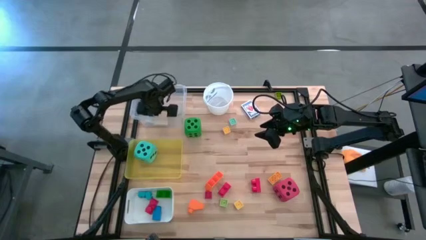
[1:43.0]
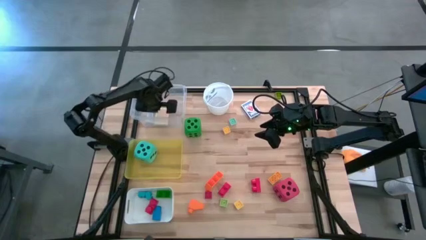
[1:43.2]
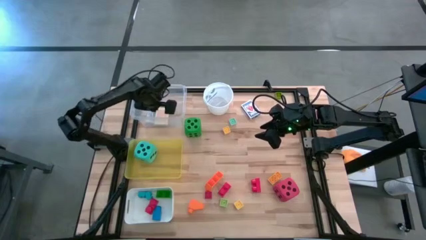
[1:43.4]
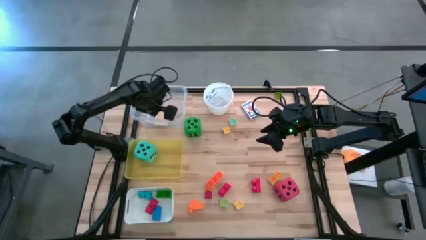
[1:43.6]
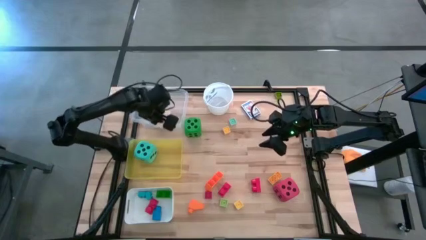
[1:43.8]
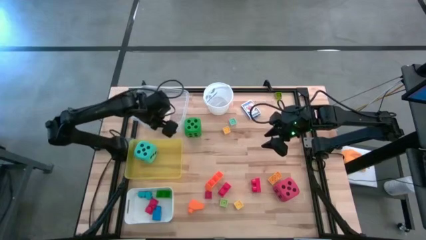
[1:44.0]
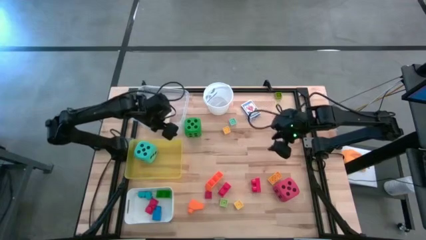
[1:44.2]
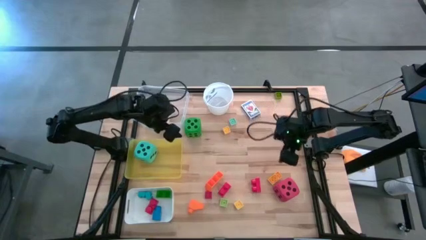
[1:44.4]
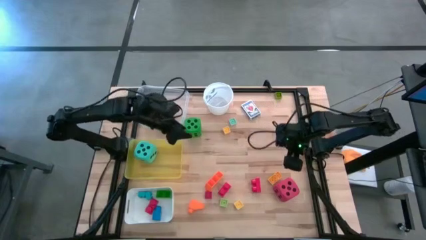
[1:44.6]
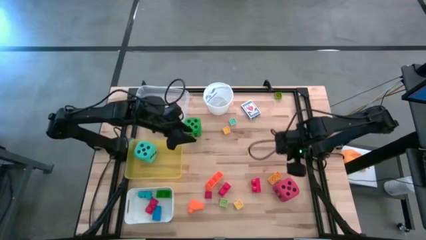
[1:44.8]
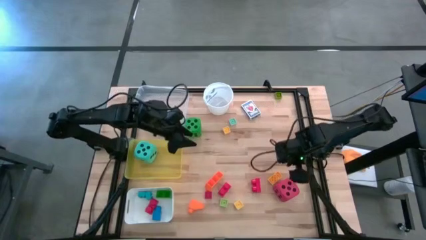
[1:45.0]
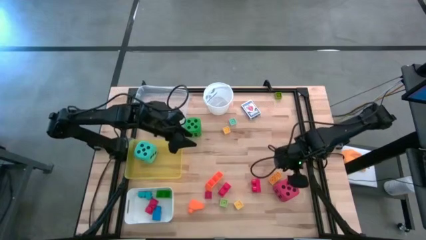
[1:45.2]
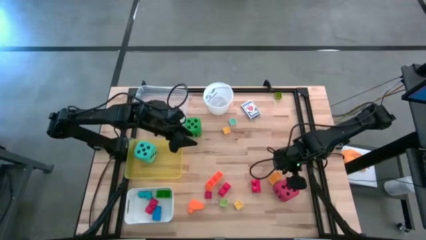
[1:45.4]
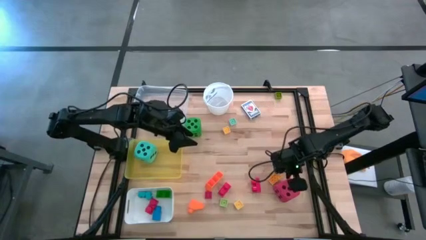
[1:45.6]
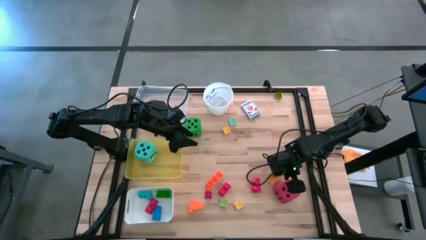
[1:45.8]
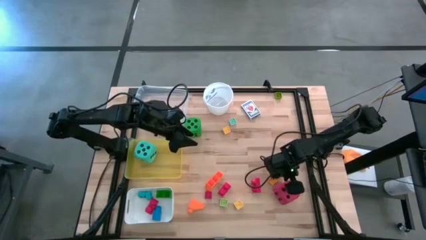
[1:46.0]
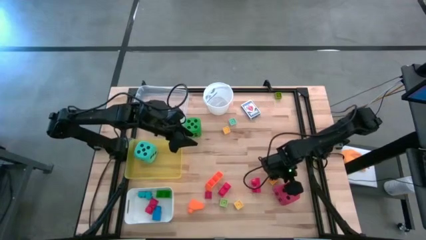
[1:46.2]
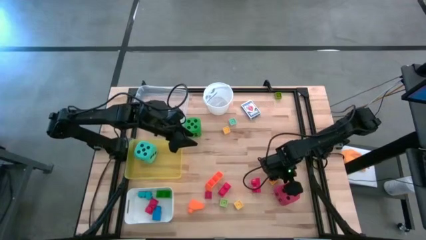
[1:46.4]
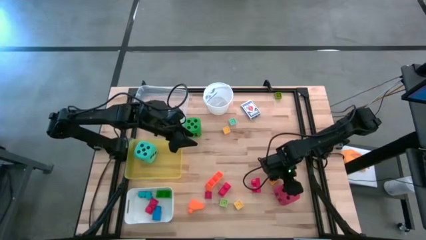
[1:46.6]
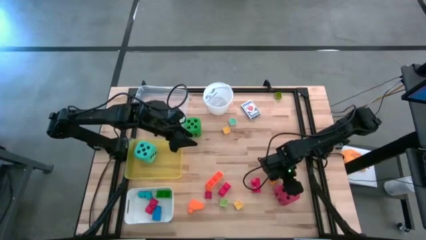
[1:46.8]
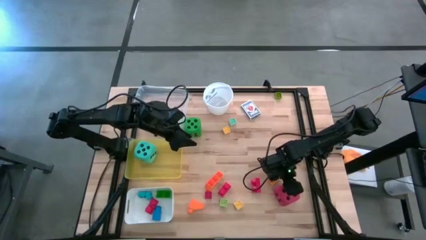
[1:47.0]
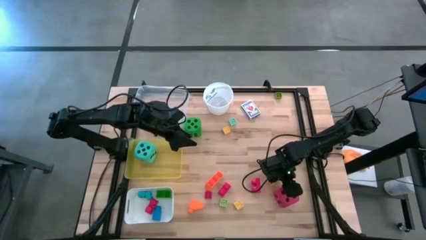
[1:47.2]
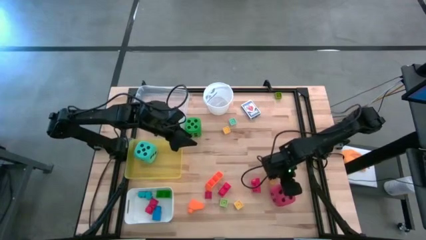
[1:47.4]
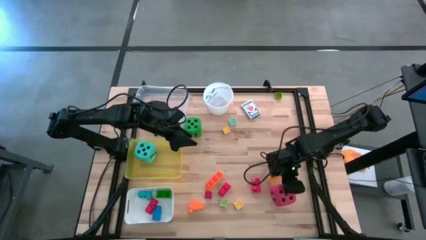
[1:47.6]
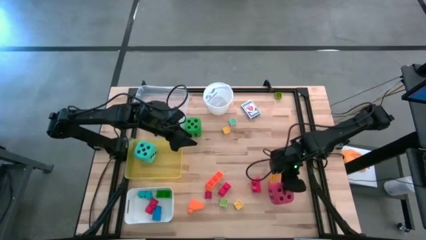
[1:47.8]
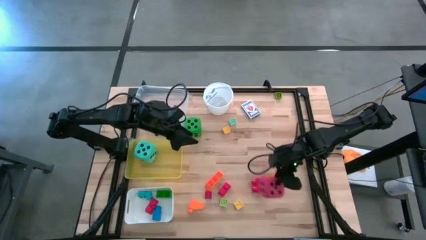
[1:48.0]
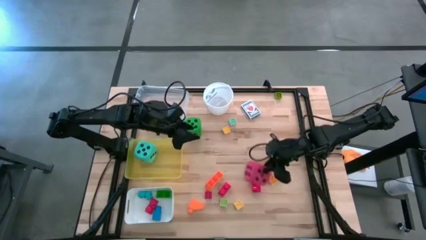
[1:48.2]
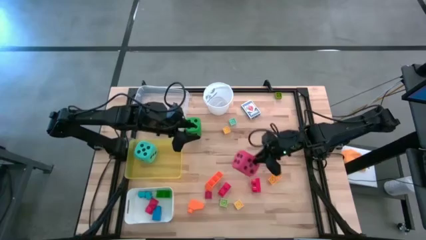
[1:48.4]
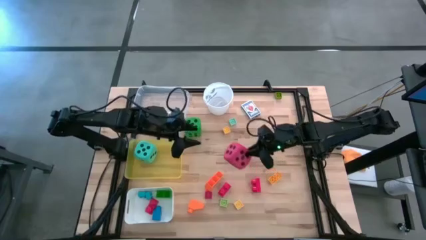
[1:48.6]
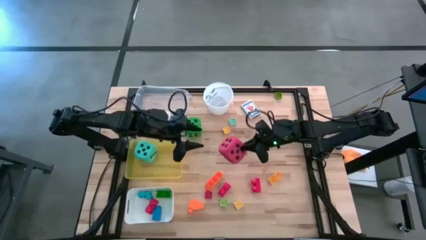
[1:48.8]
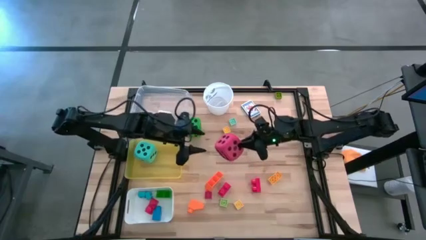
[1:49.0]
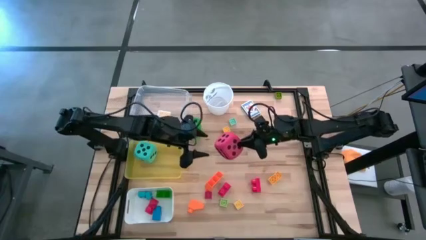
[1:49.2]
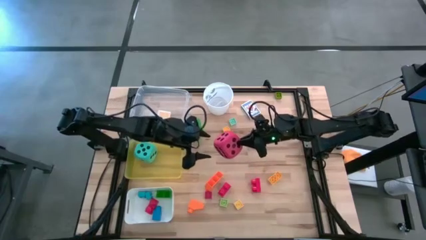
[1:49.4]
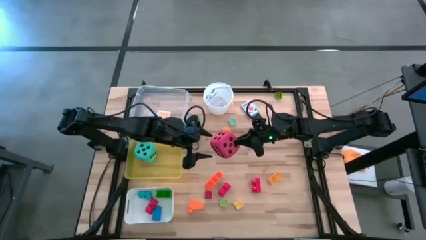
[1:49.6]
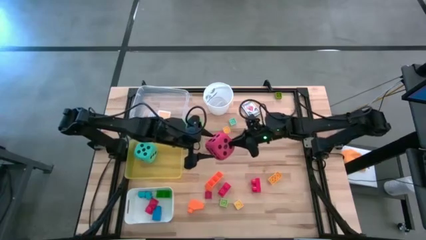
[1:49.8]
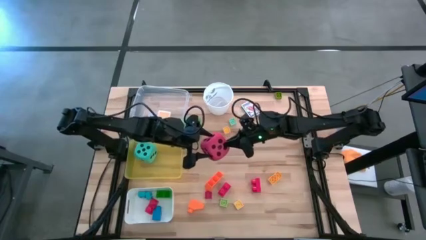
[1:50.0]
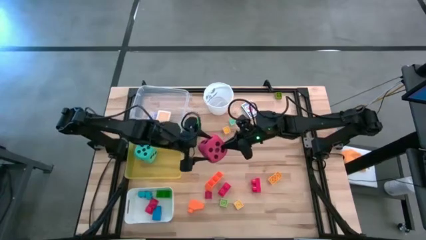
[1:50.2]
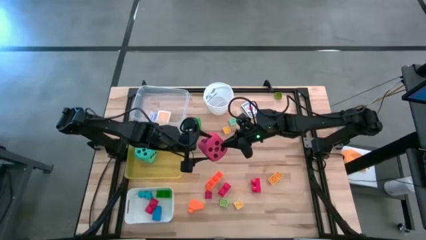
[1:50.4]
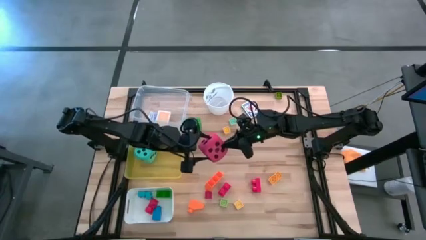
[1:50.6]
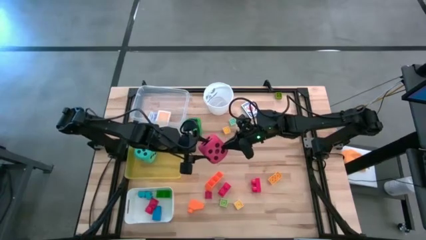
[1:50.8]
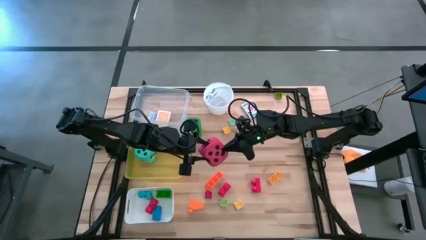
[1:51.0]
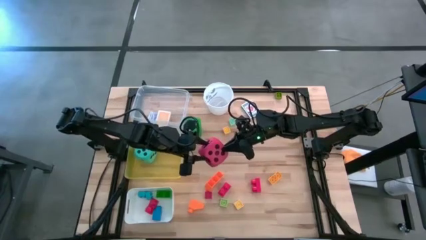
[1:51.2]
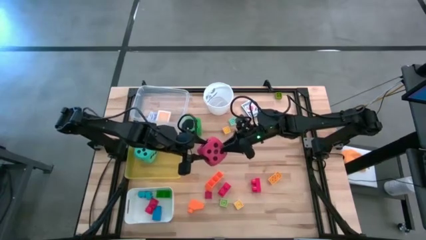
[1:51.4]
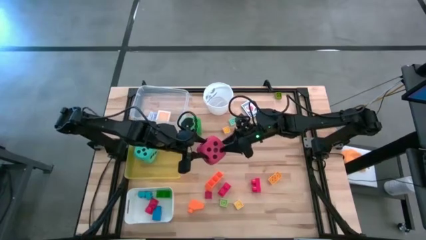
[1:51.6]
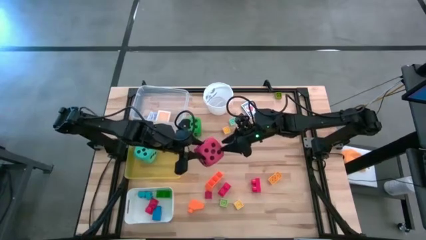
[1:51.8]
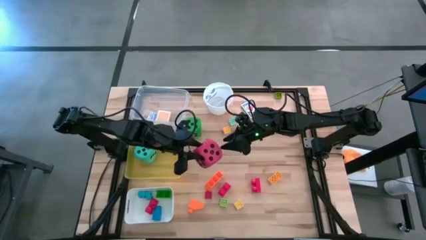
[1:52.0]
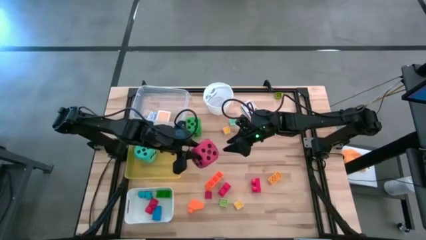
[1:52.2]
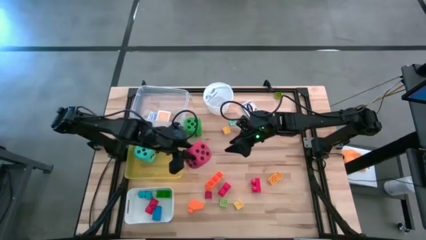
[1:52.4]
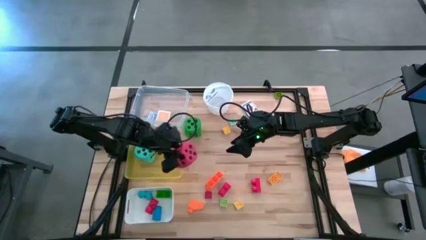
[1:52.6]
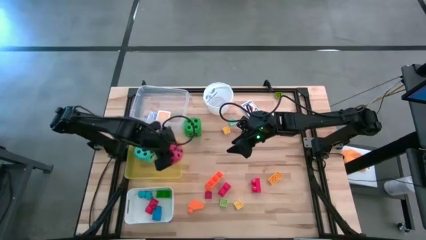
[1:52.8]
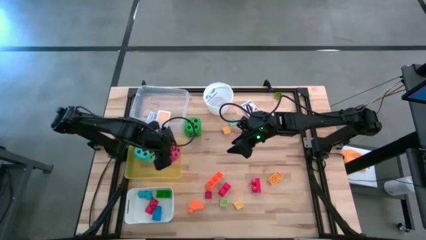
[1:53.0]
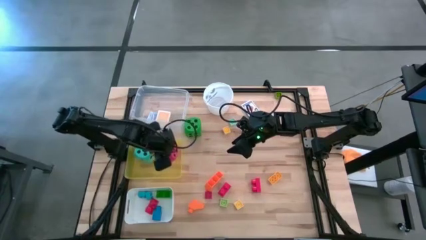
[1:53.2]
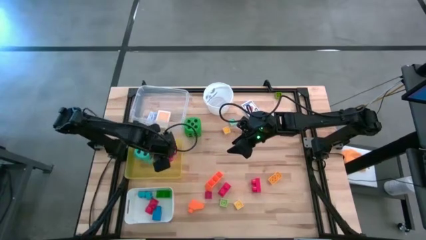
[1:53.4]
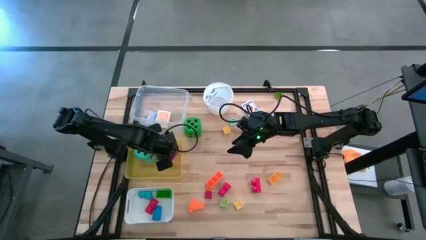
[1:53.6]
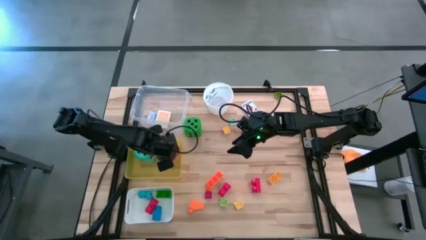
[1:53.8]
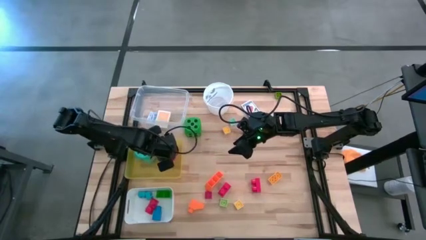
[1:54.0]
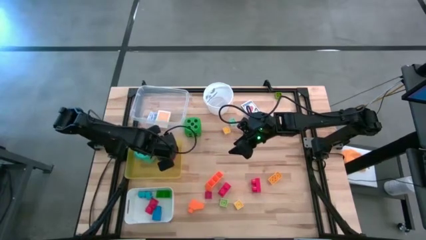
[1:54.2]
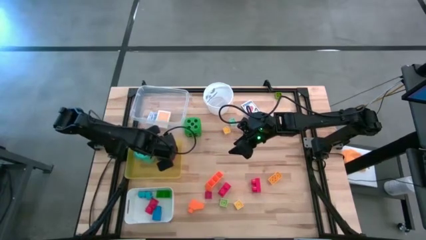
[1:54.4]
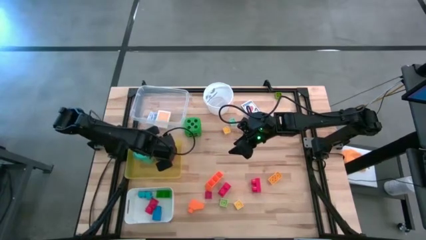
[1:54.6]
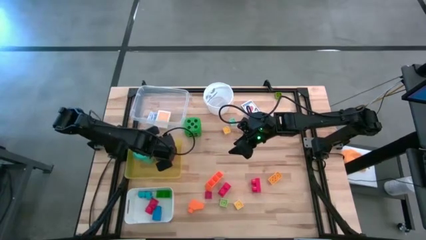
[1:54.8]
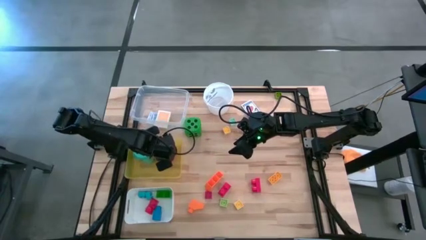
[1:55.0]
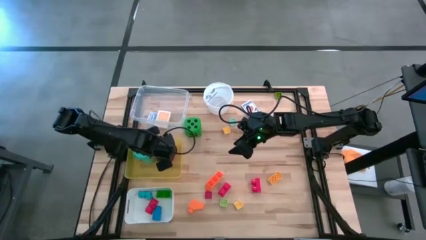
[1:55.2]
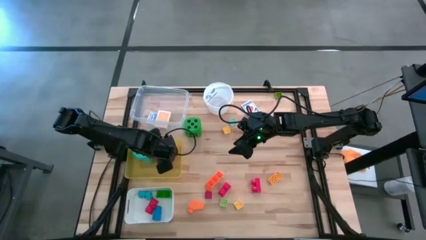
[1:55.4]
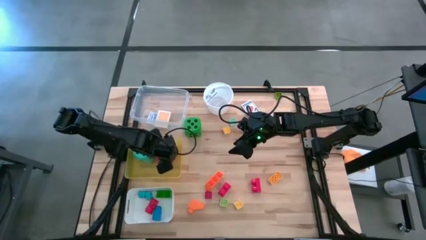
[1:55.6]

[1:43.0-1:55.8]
Task: Pick & Place Toys
Put the red die into the yellow bin

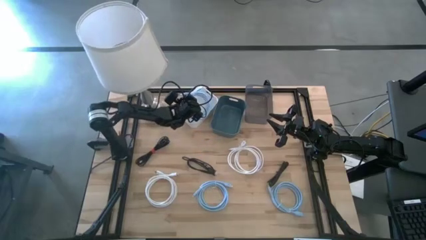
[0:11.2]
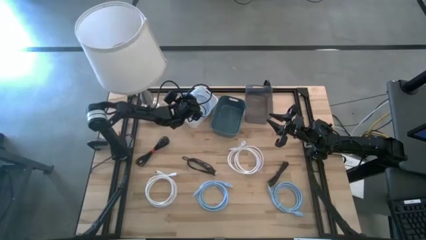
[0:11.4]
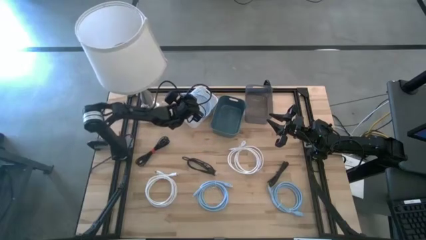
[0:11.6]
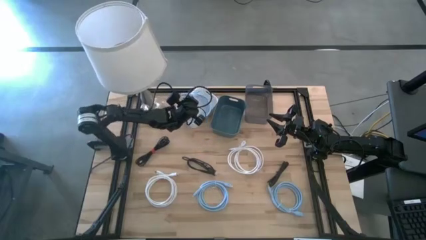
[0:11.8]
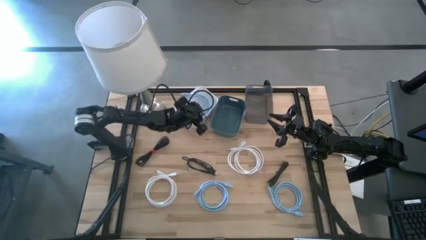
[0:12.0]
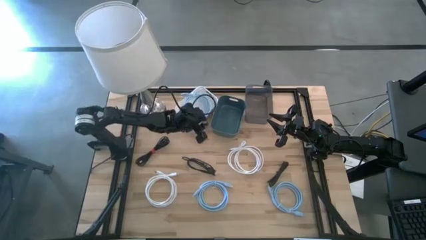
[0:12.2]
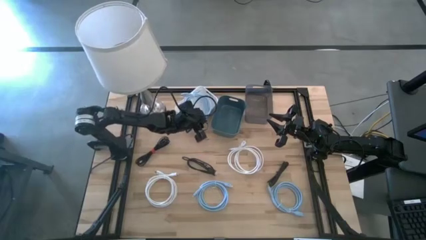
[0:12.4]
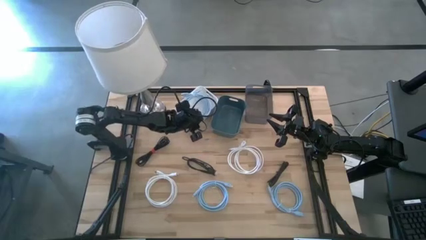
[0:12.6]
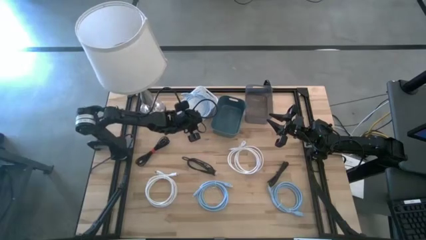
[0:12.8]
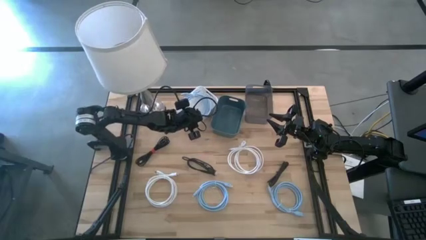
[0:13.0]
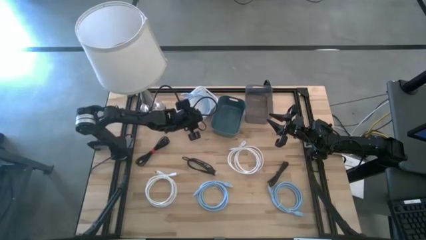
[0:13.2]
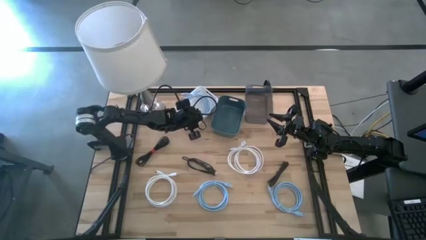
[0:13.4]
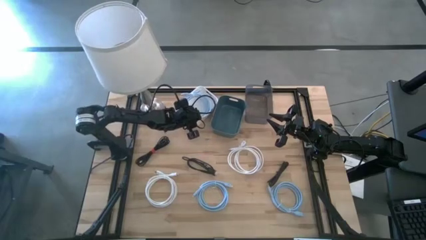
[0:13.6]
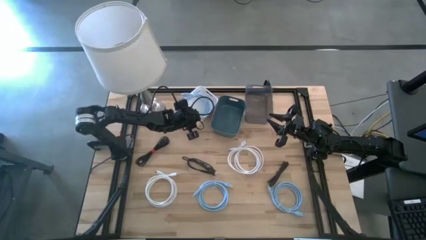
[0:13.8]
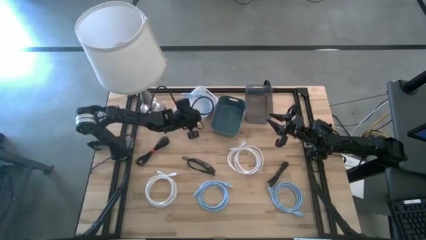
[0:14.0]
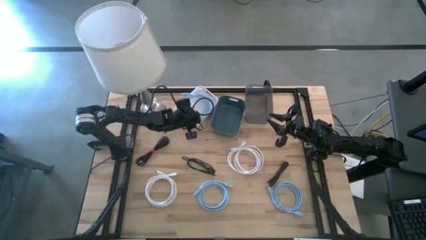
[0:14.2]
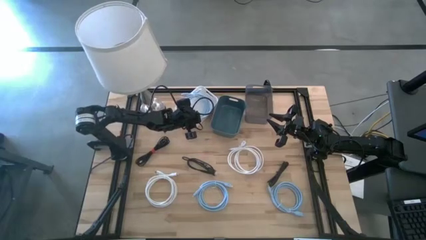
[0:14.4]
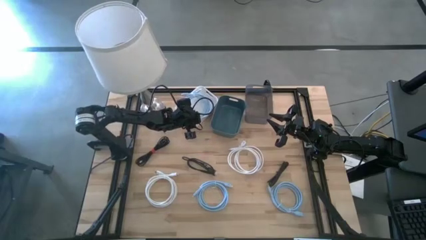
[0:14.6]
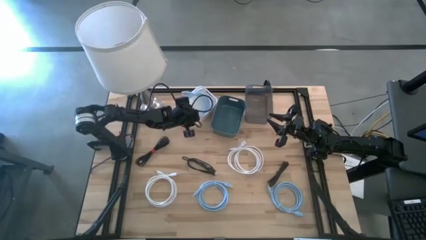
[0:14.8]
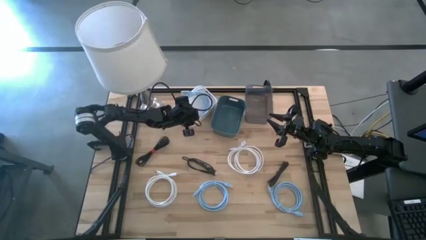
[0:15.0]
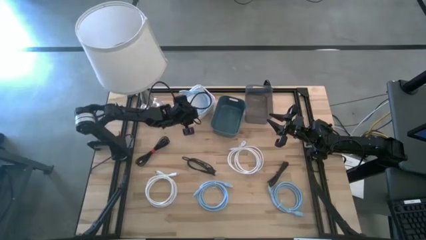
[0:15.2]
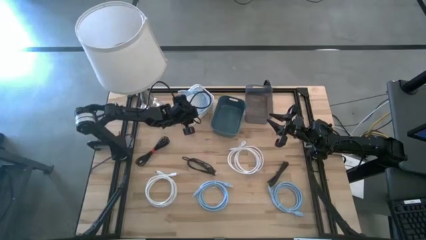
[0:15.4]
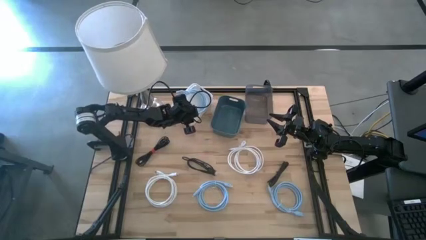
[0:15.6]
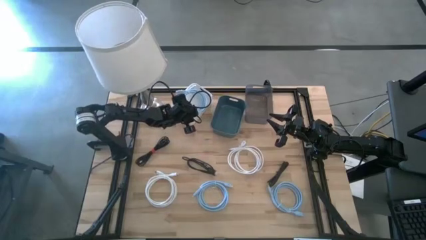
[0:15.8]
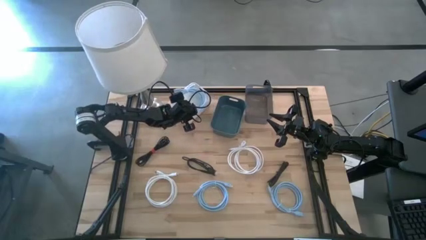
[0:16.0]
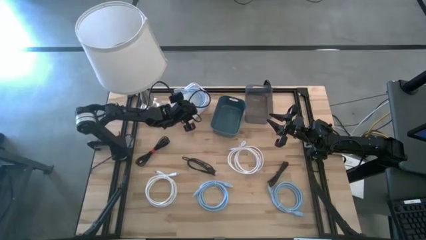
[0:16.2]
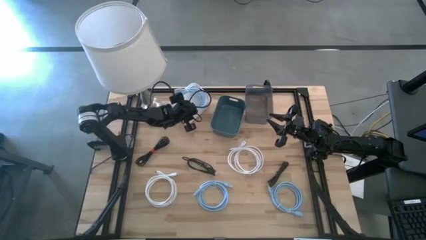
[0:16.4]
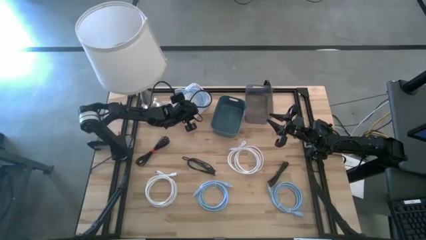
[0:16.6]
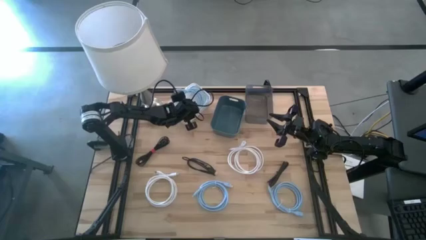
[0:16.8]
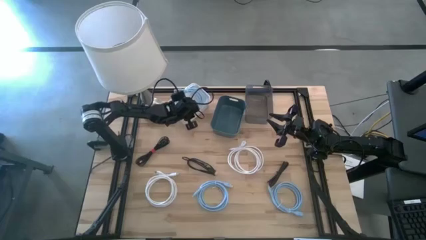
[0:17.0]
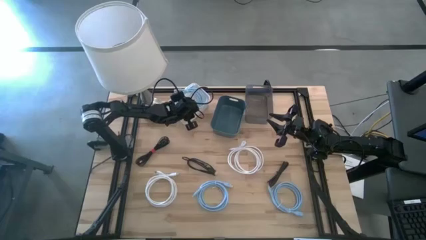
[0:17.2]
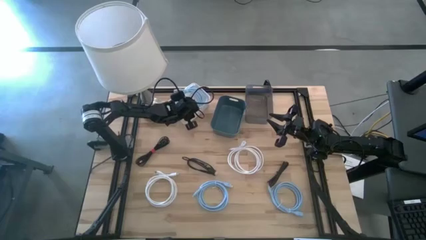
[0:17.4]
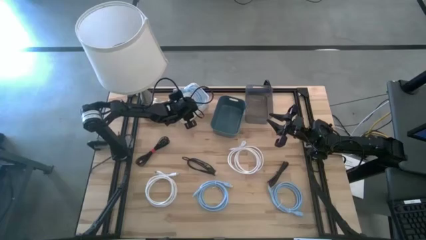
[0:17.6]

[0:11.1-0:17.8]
Task: Pick & Place USB Port
Adjust the white bin on the table
